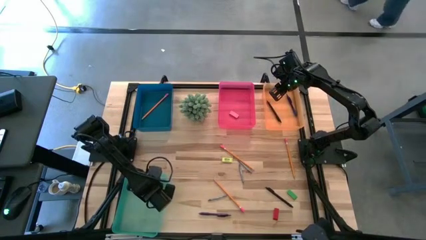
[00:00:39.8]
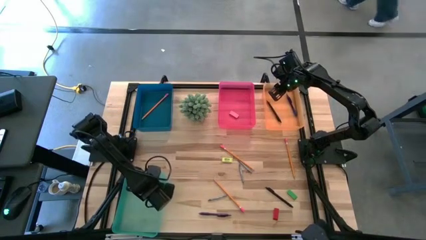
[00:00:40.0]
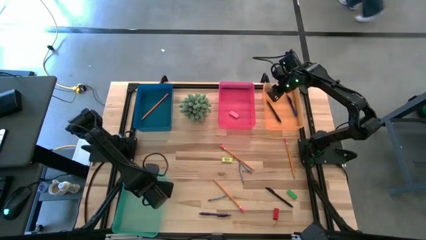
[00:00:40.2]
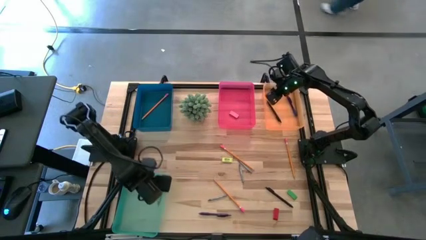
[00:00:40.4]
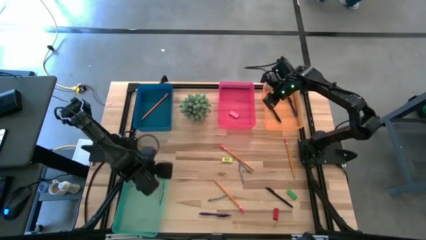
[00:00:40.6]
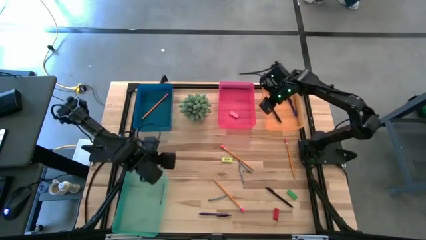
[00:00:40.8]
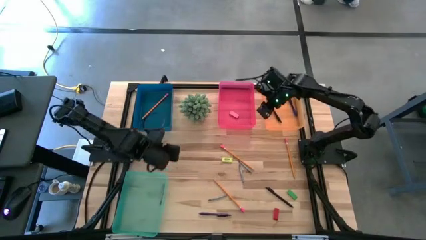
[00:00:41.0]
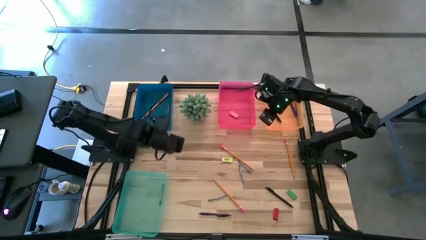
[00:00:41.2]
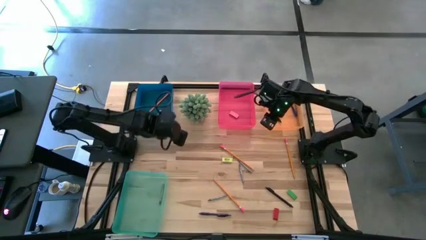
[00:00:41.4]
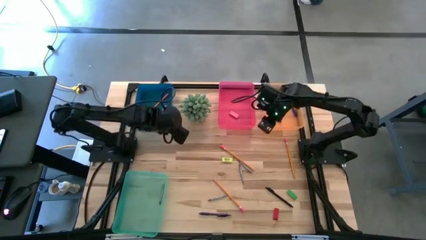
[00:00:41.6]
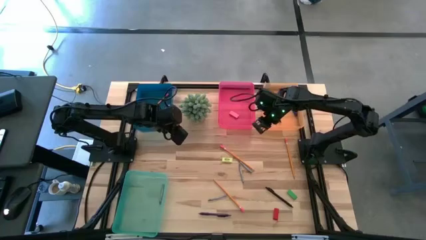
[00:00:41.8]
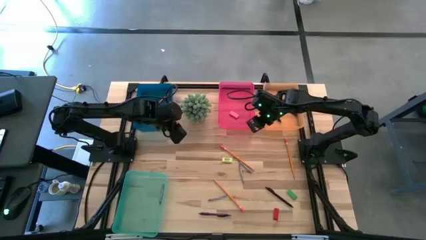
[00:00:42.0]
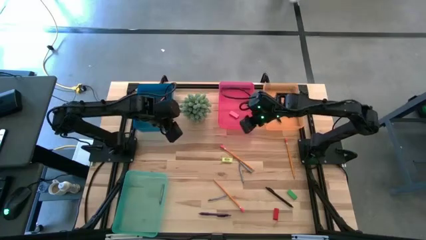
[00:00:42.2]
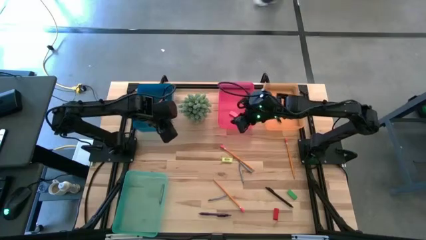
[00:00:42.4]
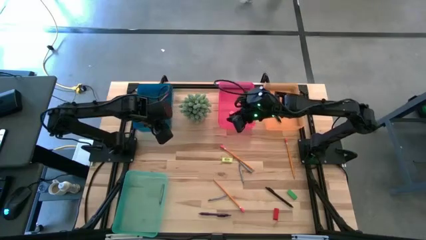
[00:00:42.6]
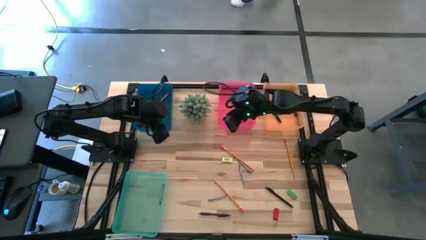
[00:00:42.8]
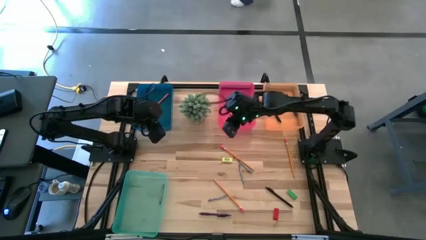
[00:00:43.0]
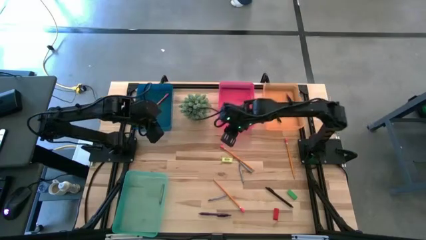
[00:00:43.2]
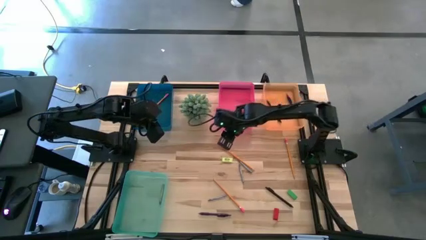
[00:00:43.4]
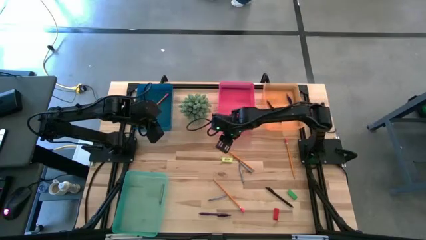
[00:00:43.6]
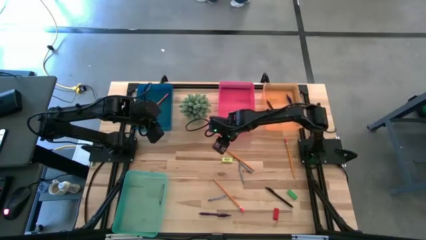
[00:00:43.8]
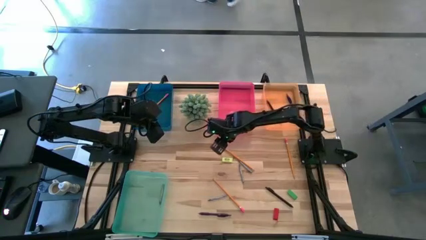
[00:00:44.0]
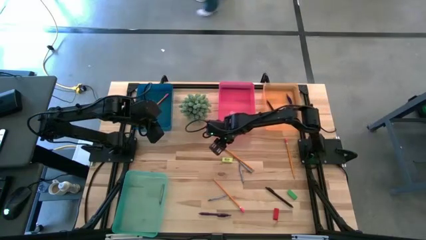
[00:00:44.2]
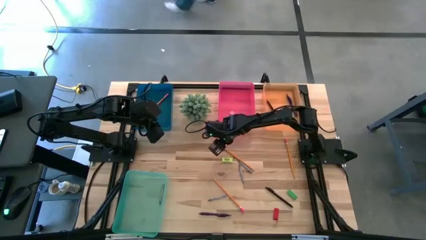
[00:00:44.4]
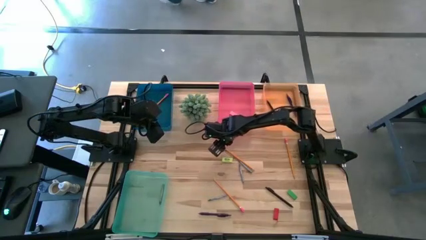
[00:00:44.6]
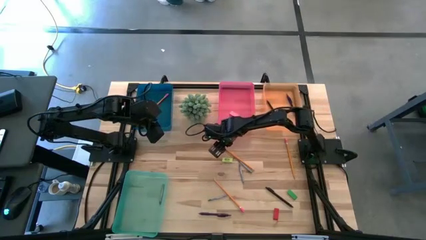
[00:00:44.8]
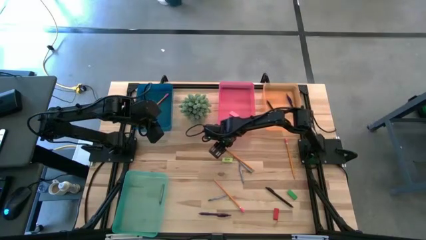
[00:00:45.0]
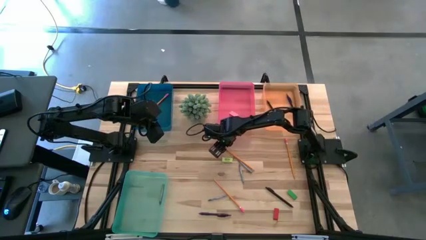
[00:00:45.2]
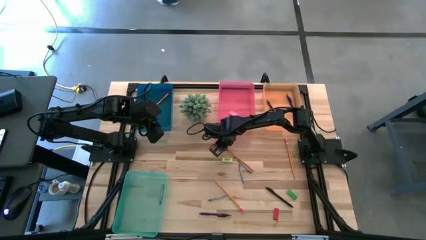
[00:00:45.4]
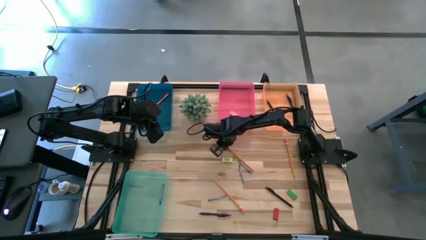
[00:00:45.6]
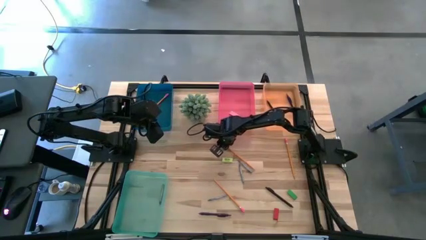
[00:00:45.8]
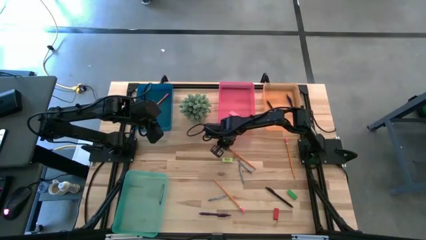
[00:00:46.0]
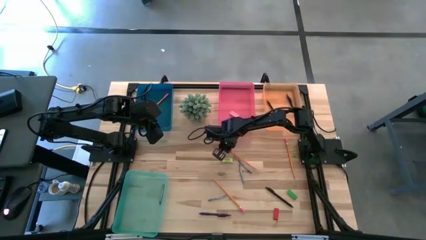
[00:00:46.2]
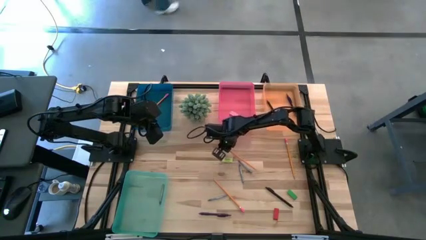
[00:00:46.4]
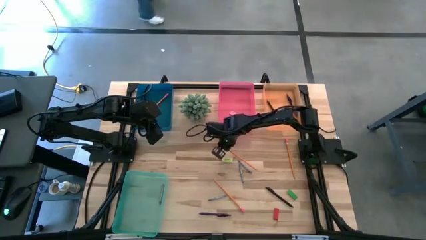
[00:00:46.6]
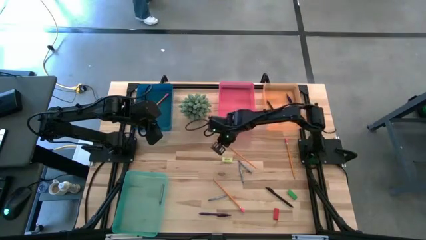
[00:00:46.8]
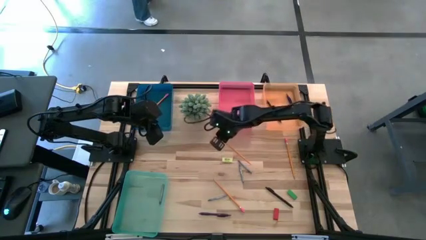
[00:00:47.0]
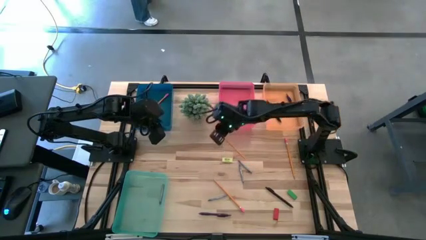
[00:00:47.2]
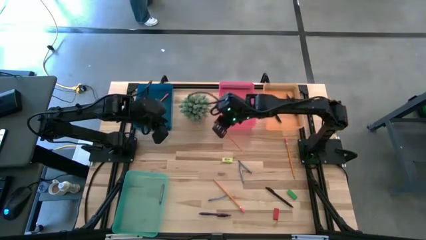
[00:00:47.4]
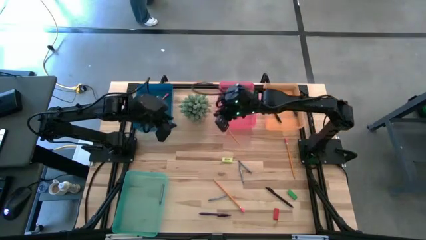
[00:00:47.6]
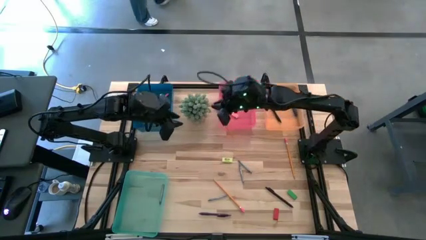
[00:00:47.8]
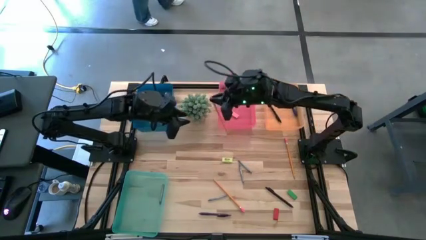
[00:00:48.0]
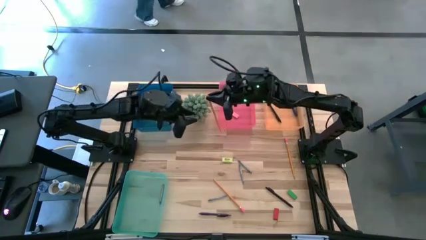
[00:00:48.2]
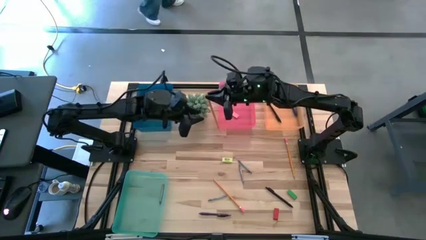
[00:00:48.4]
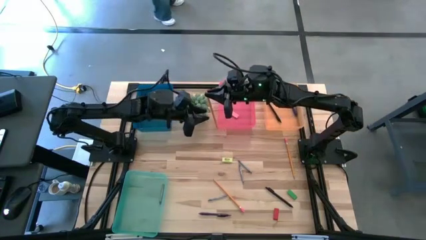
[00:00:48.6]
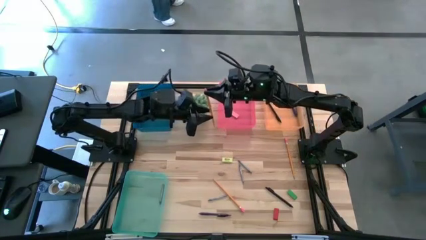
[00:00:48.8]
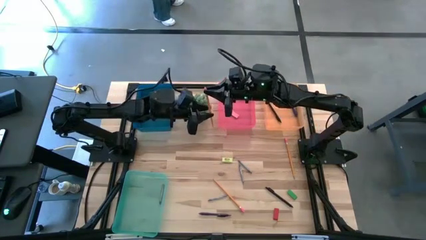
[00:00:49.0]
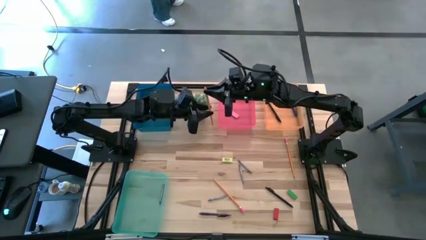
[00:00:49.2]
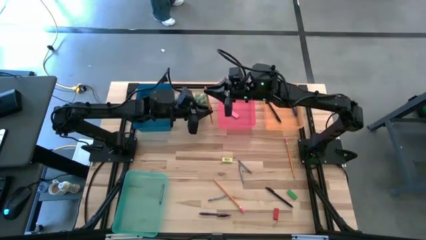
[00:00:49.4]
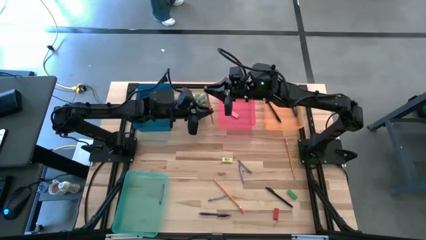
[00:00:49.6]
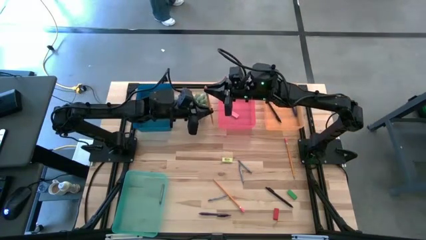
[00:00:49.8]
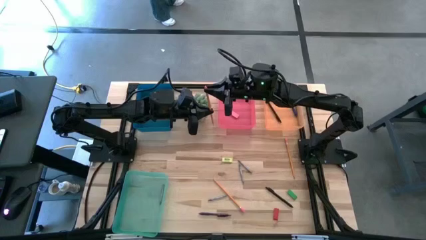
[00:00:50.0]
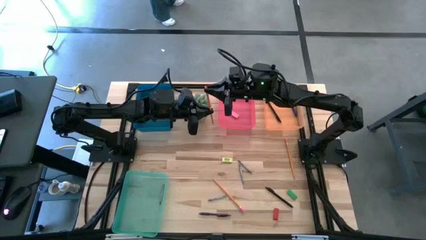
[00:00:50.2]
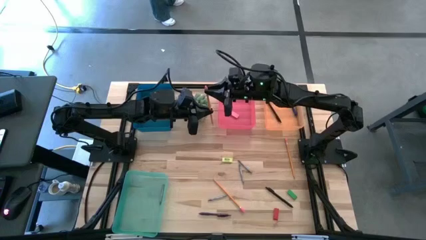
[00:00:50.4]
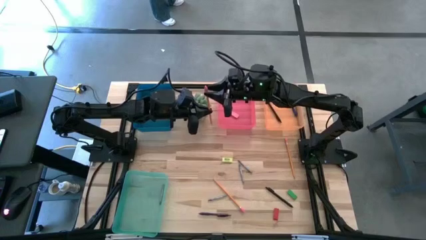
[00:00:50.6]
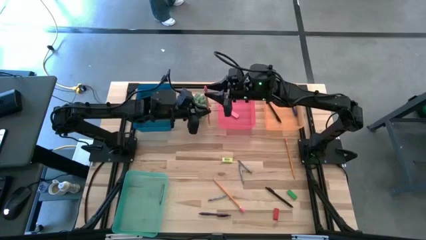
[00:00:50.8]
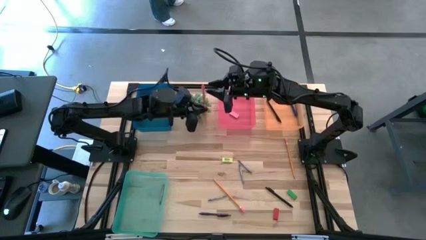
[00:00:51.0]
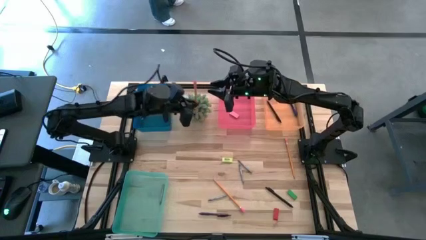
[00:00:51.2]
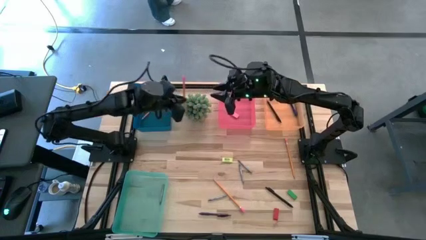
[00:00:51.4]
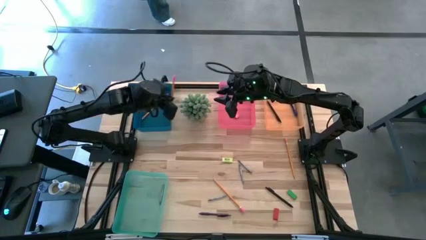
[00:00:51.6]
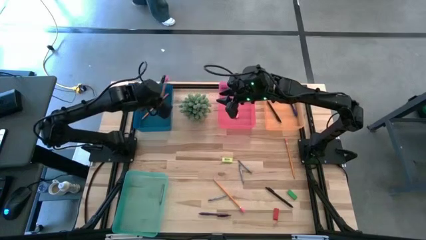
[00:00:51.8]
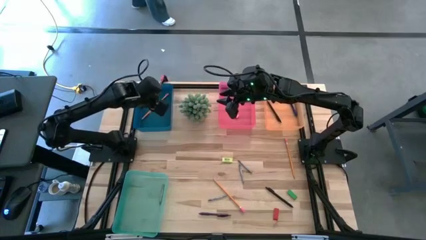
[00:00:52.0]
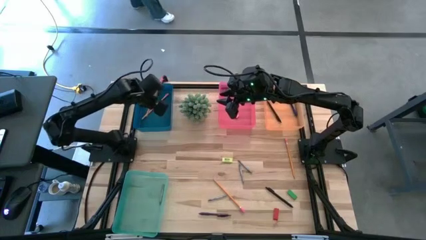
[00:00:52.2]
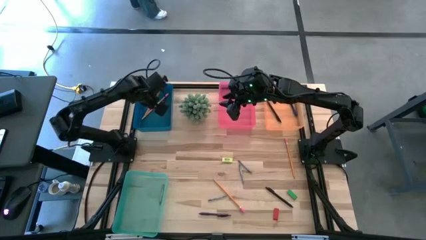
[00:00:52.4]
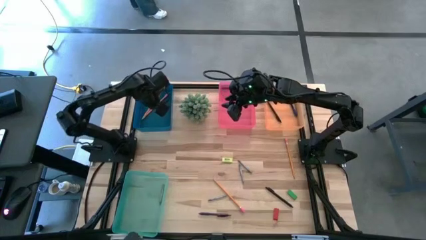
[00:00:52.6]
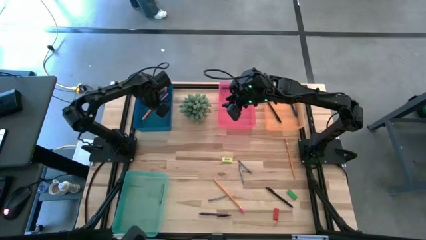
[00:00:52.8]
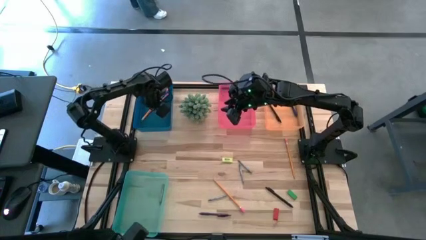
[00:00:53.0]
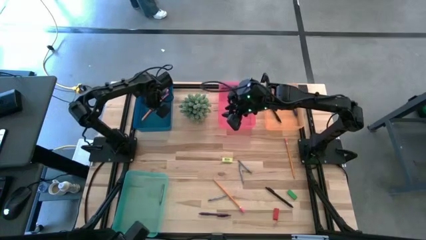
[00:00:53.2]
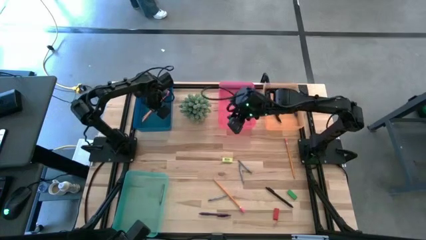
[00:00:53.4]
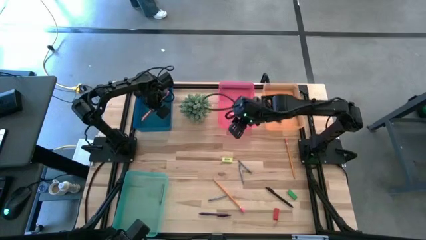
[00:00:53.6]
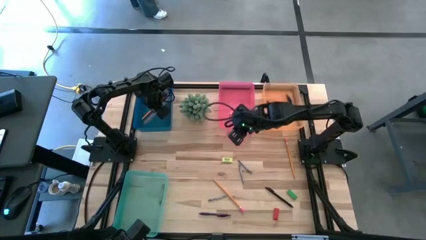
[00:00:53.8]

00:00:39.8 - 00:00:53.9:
Task: Sort crayons/erasers/pens/pencils in bins
Put the orange pencil into the blue bin
